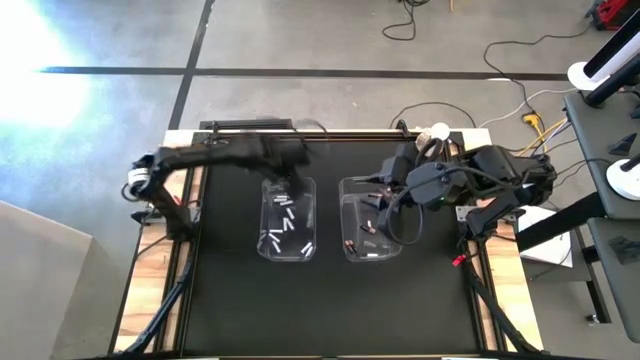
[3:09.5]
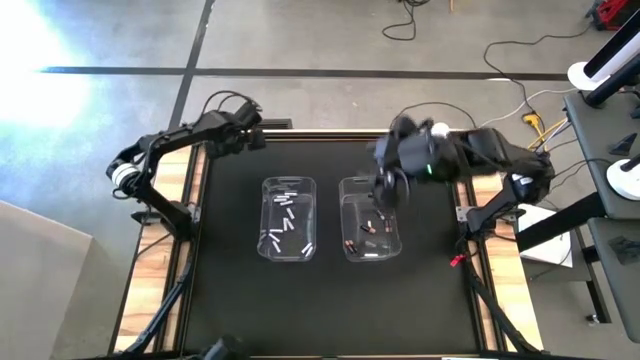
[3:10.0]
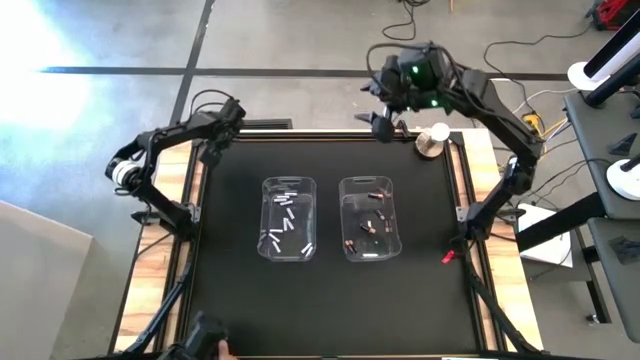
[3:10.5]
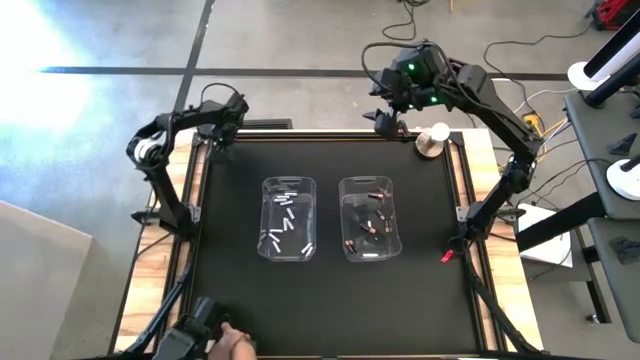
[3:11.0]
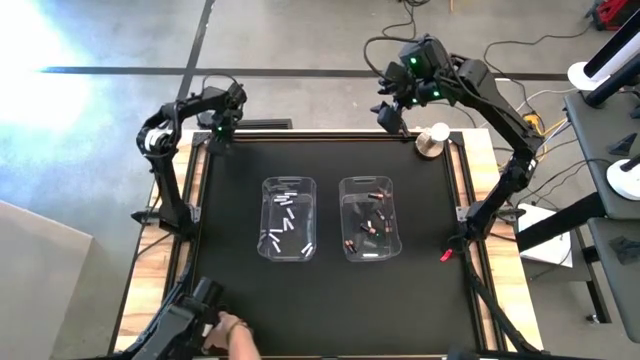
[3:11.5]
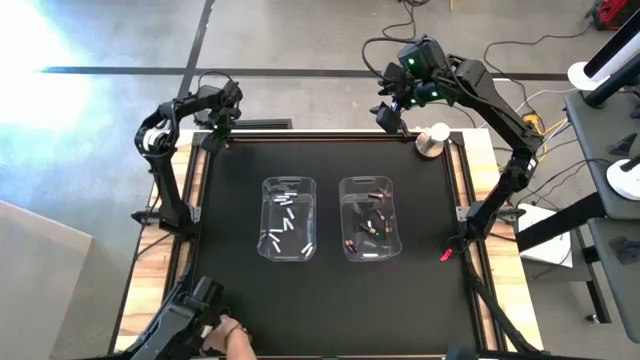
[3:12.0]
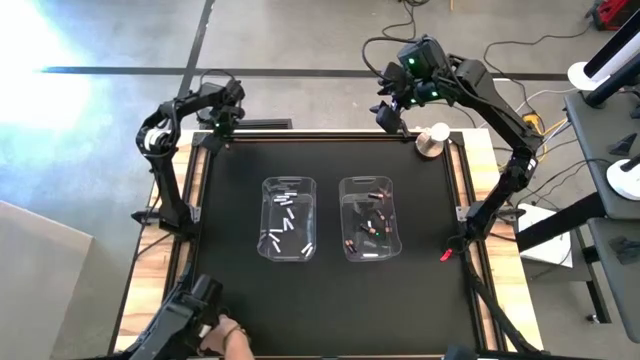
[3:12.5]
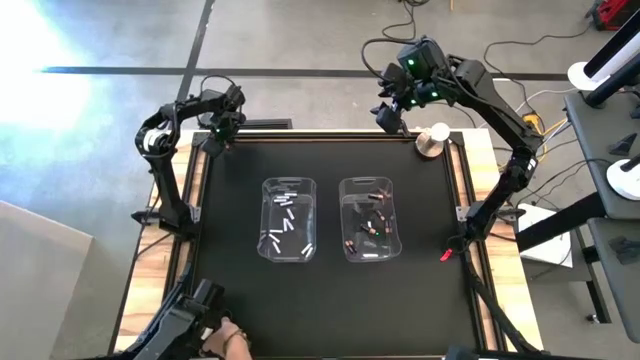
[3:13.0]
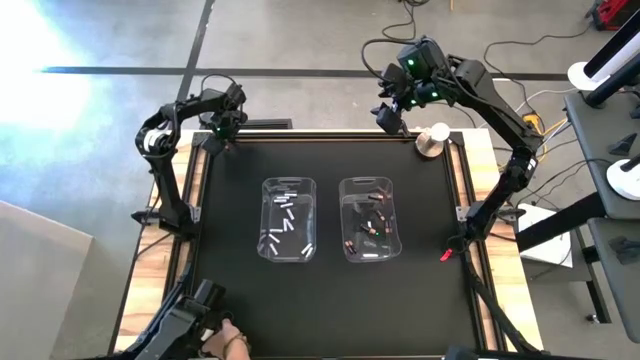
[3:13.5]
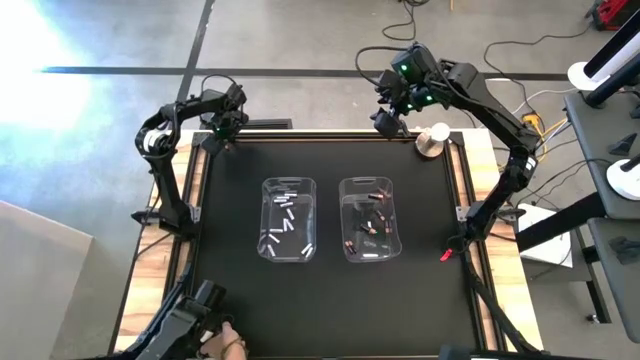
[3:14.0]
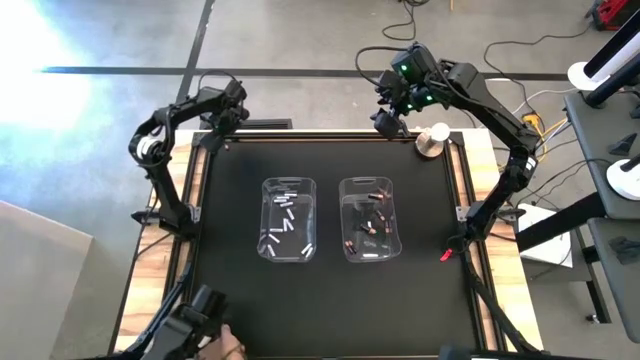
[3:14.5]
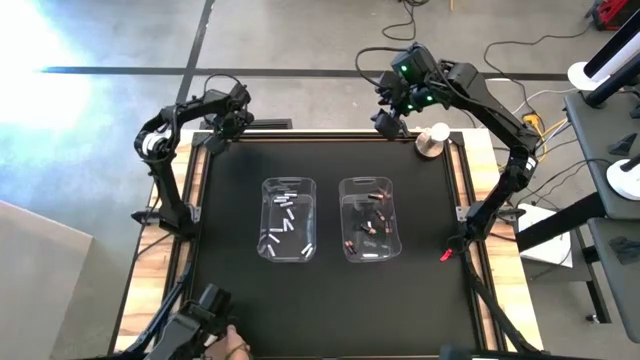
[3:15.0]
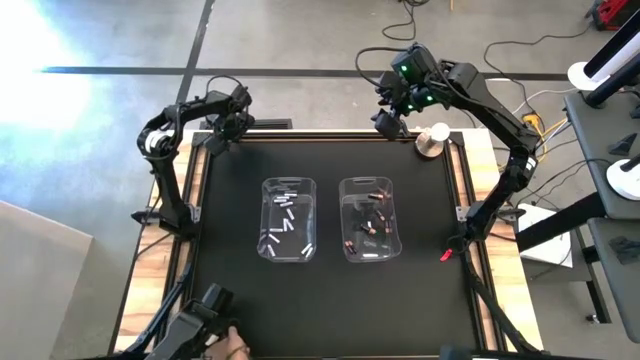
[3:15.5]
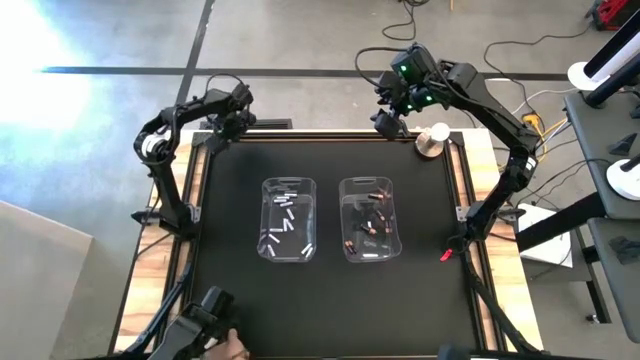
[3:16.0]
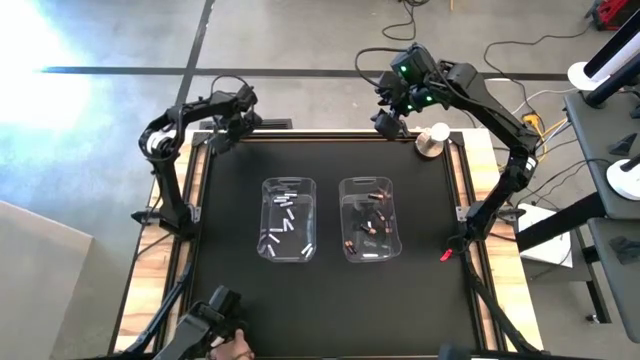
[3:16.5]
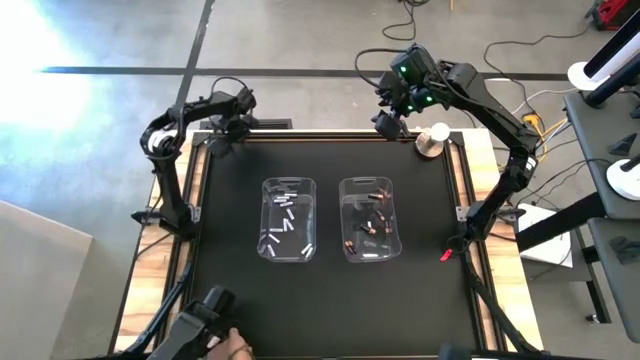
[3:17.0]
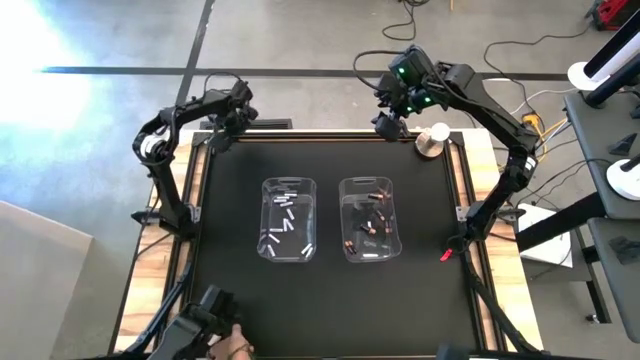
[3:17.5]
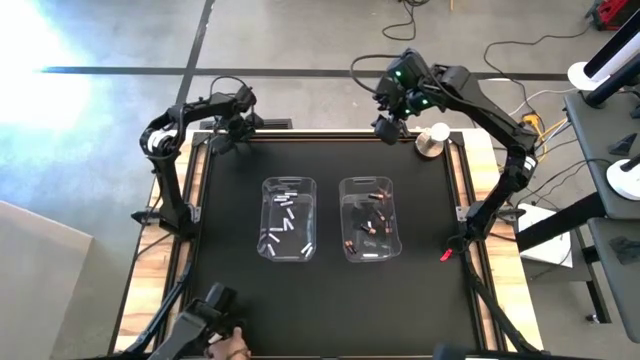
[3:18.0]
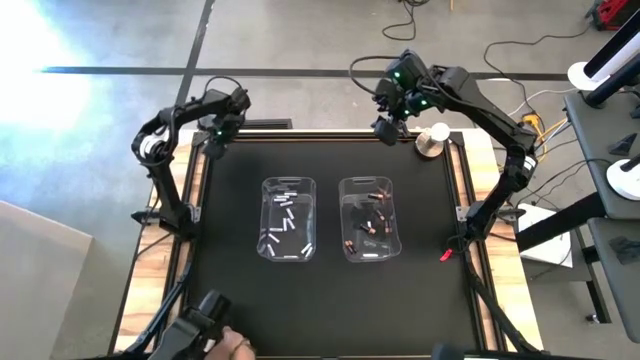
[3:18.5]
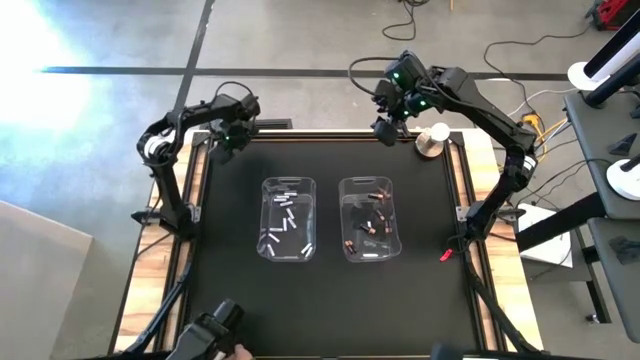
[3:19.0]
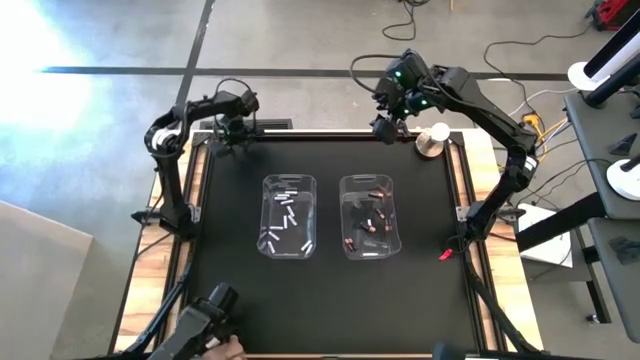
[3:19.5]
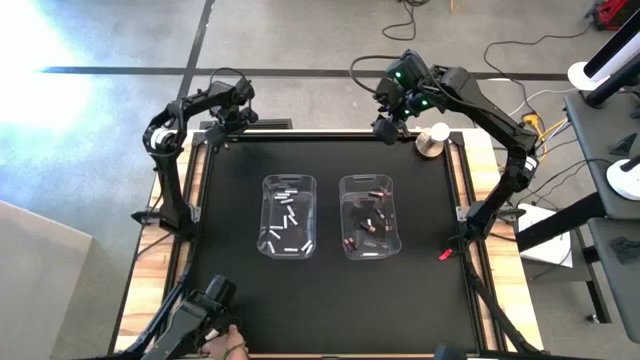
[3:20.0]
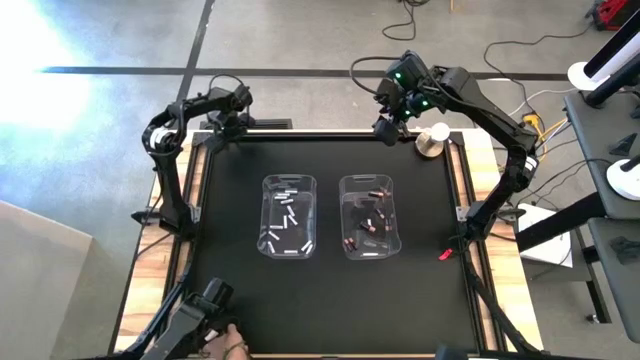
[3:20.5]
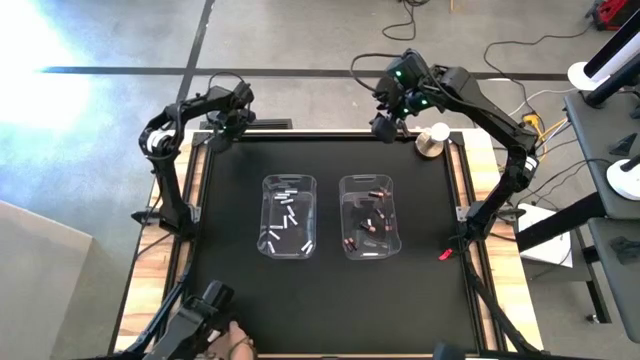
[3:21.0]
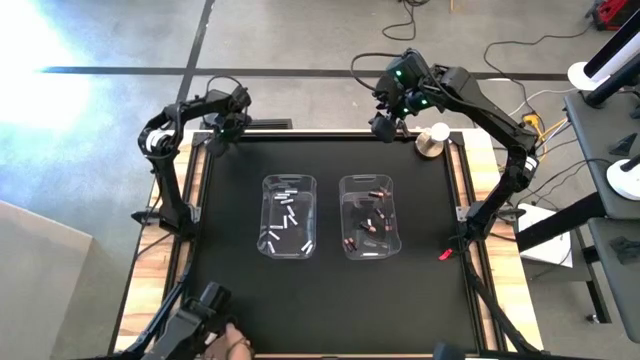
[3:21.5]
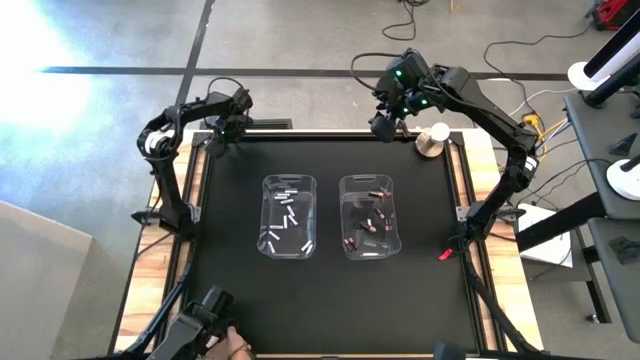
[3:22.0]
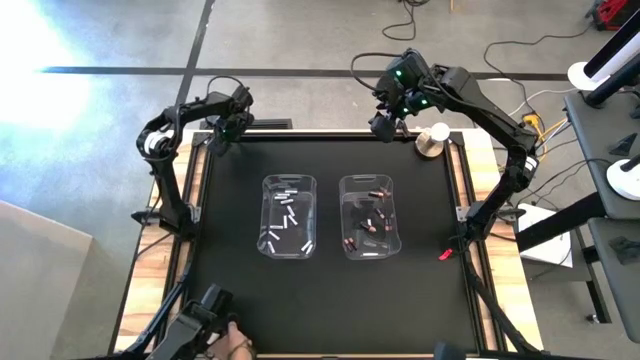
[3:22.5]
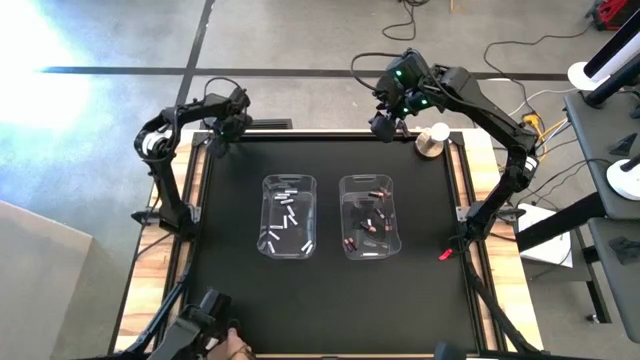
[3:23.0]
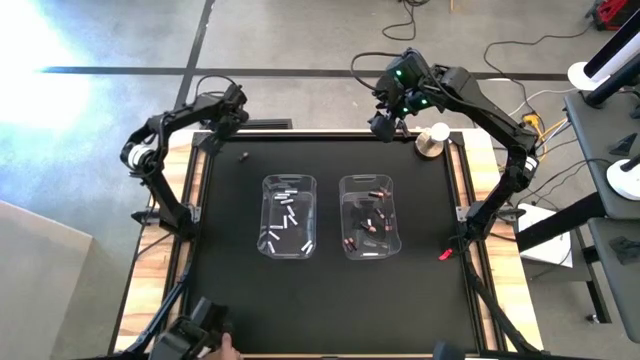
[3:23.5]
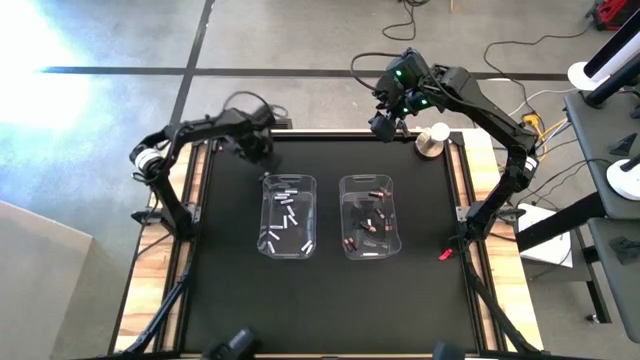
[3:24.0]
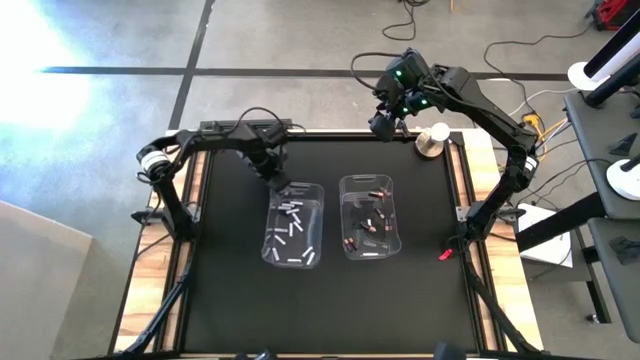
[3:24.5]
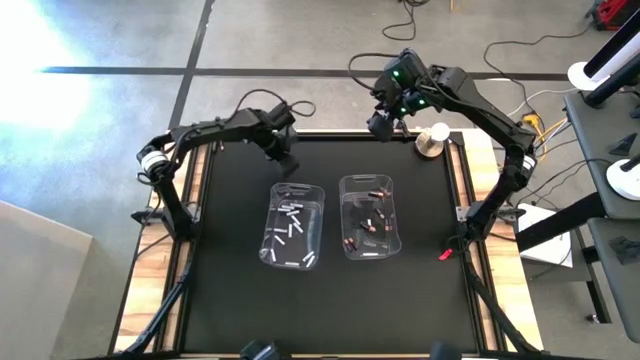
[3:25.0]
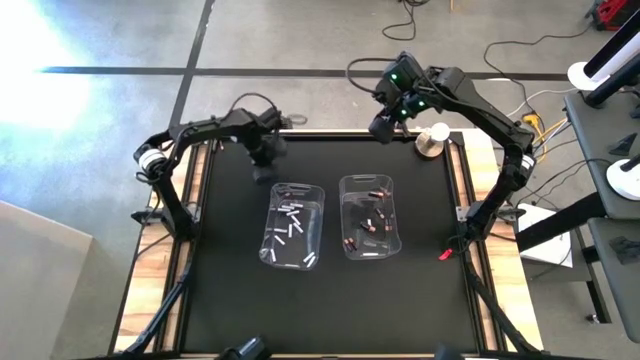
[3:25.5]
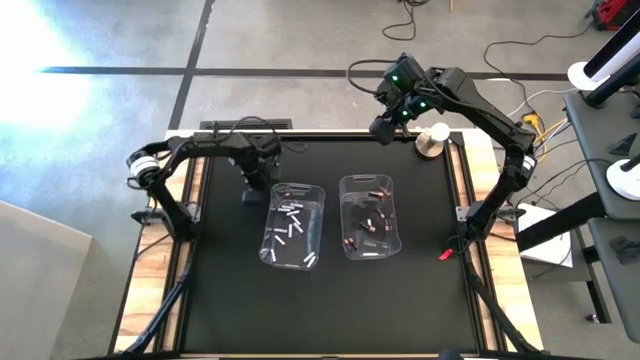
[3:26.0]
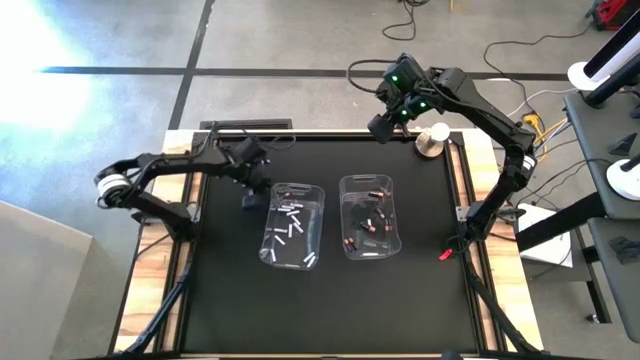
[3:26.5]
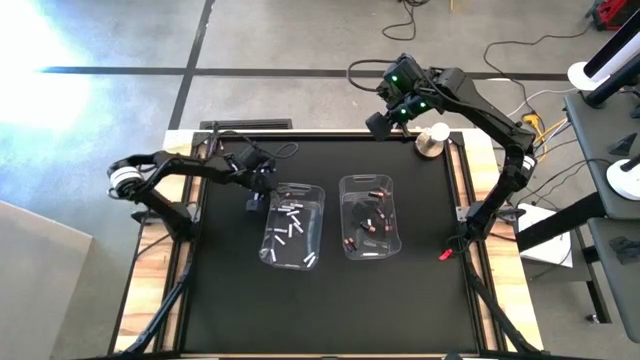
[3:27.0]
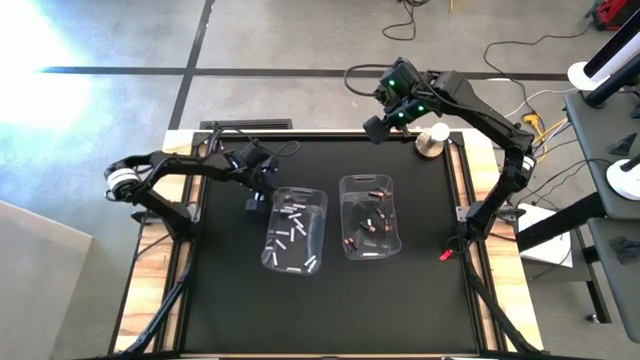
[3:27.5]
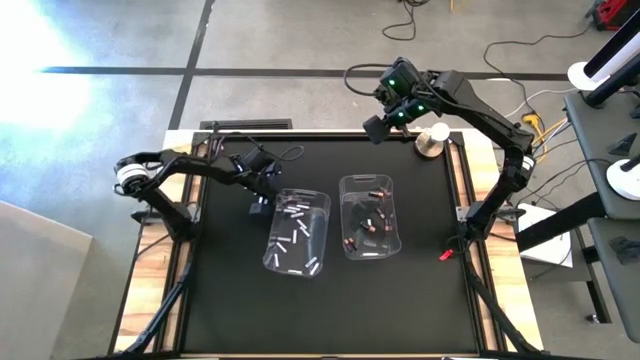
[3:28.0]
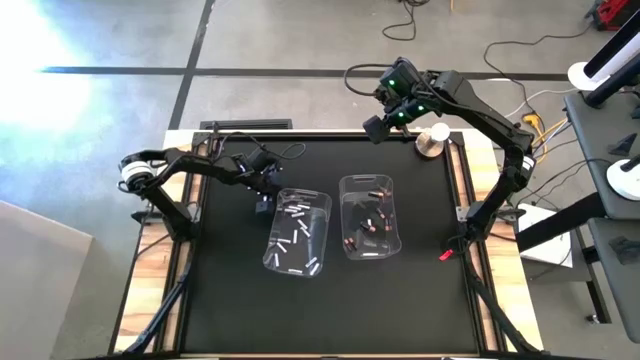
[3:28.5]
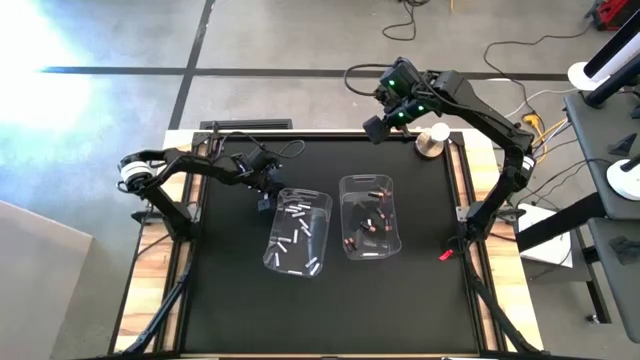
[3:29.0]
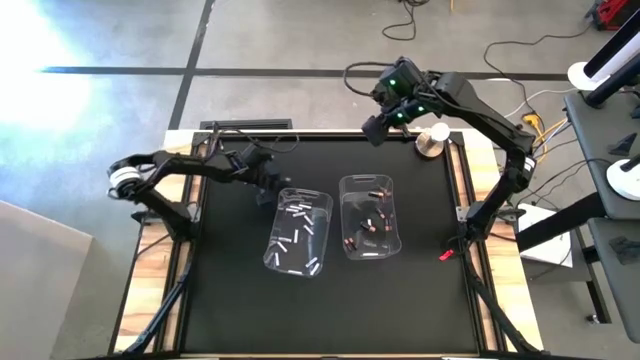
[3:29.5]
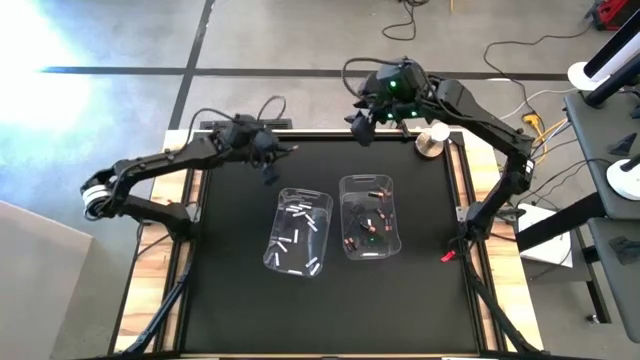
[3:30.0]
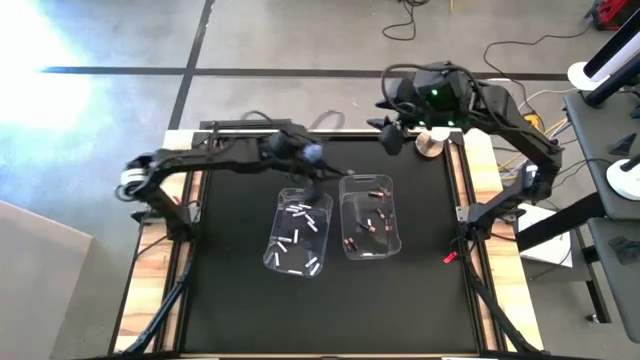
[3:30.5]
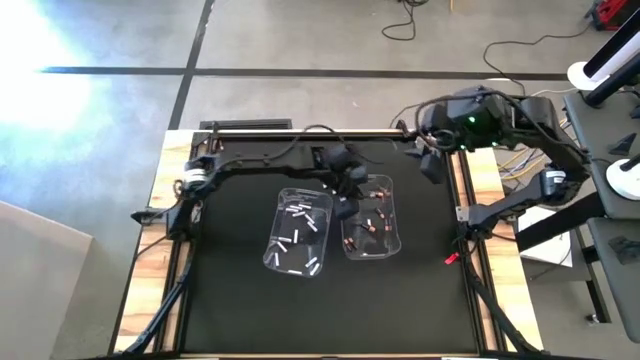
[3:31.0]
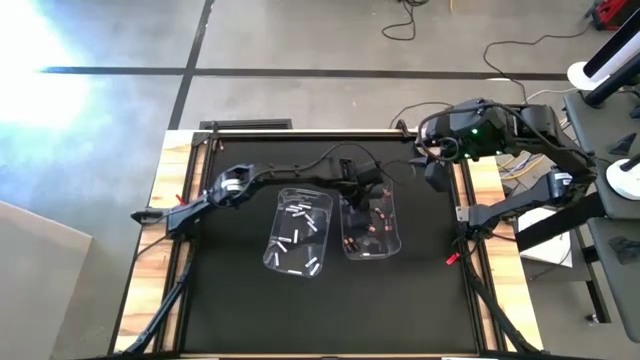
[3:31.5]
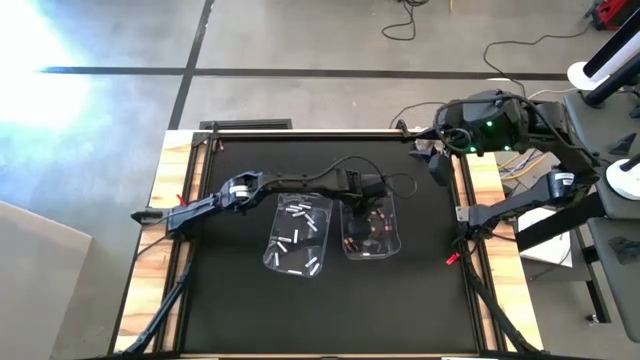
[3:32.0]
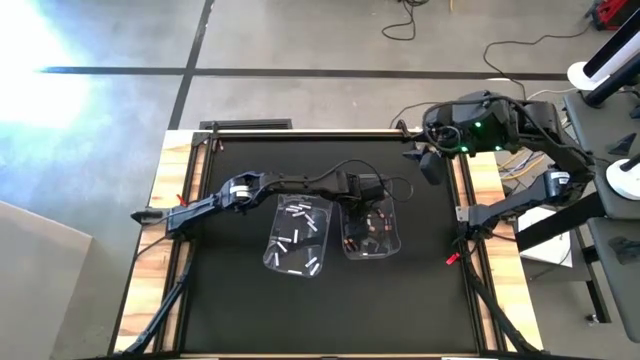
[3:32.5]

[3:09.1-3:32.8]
Task: Sort batteries
Put the black battery into the right transparent bin
